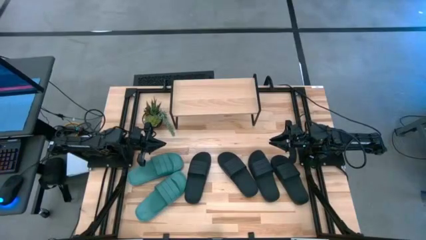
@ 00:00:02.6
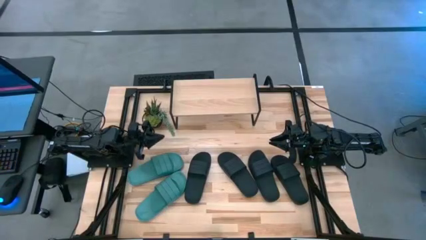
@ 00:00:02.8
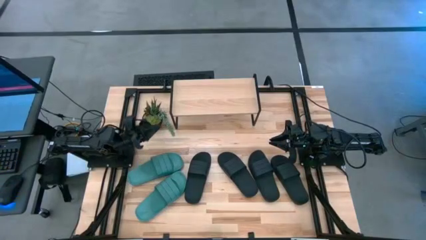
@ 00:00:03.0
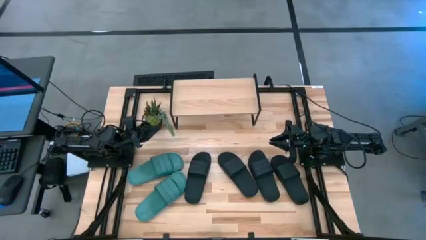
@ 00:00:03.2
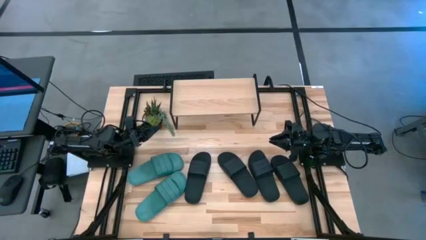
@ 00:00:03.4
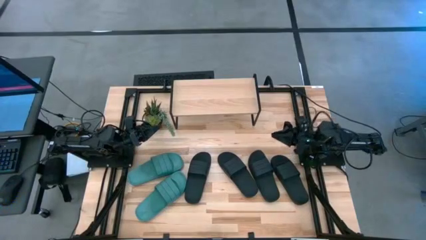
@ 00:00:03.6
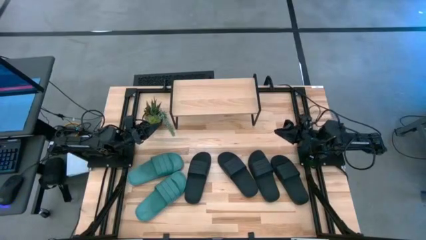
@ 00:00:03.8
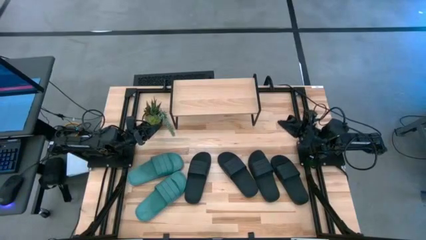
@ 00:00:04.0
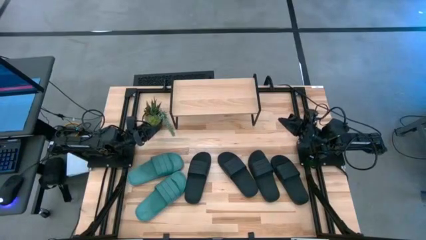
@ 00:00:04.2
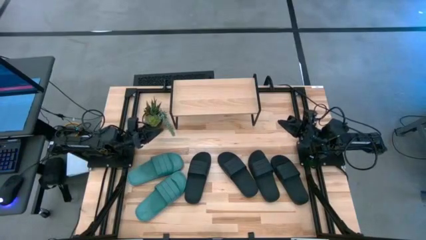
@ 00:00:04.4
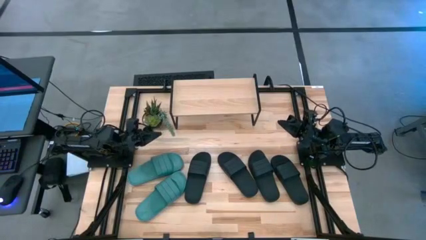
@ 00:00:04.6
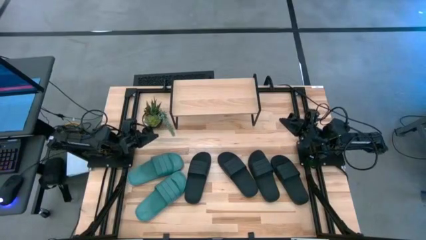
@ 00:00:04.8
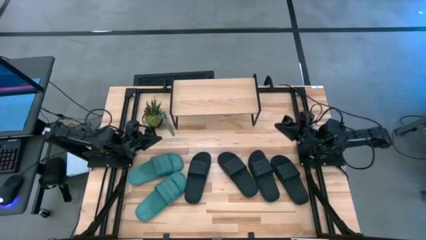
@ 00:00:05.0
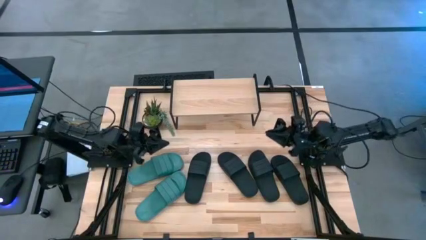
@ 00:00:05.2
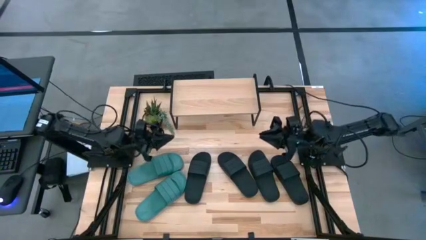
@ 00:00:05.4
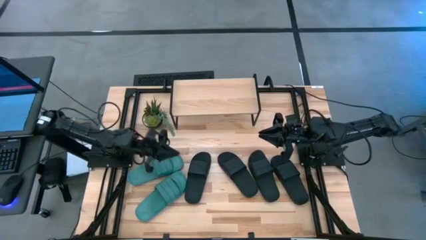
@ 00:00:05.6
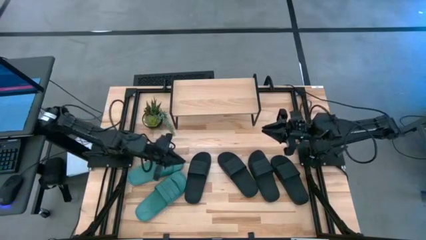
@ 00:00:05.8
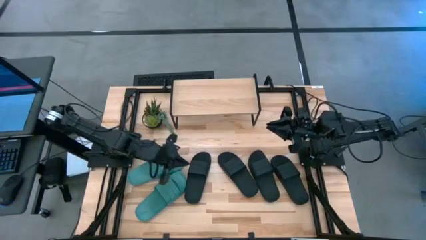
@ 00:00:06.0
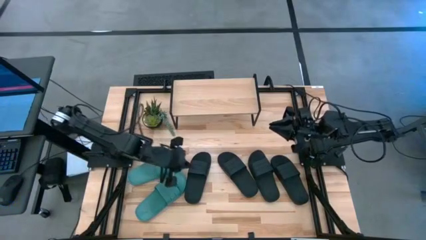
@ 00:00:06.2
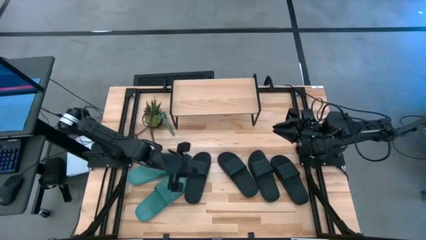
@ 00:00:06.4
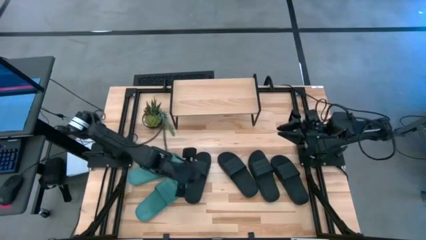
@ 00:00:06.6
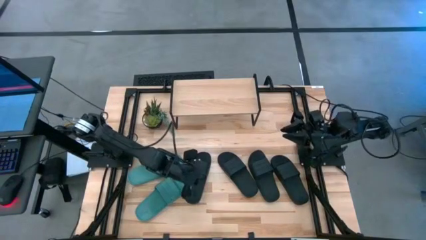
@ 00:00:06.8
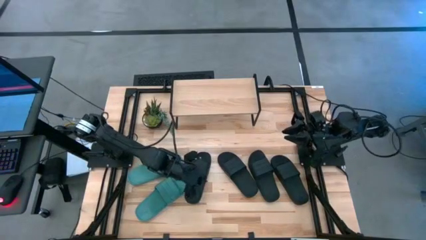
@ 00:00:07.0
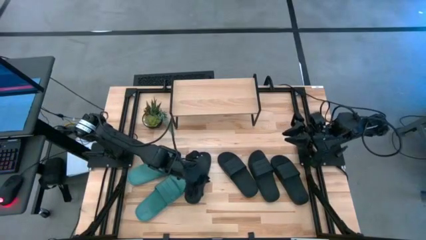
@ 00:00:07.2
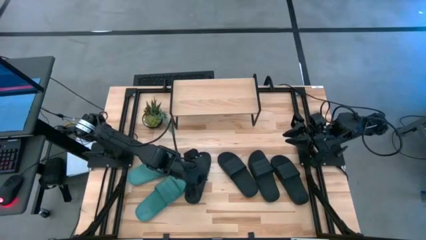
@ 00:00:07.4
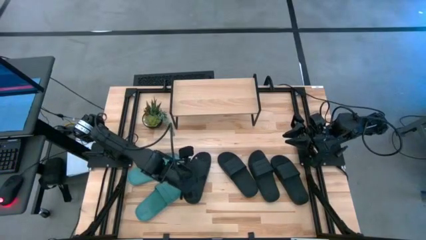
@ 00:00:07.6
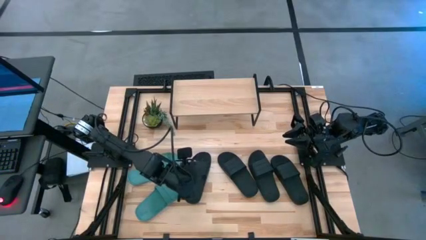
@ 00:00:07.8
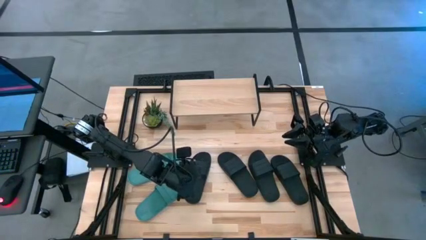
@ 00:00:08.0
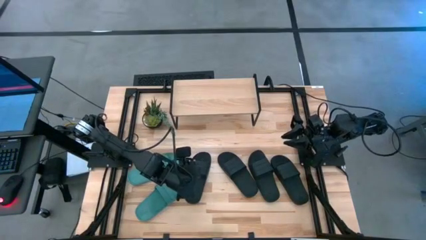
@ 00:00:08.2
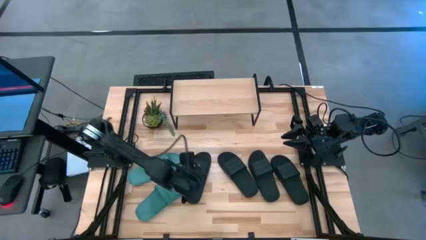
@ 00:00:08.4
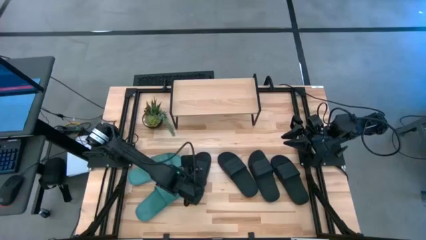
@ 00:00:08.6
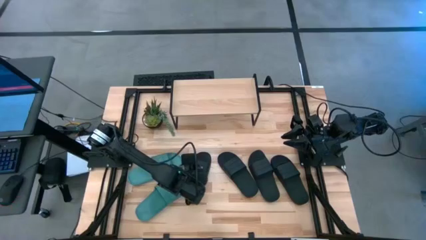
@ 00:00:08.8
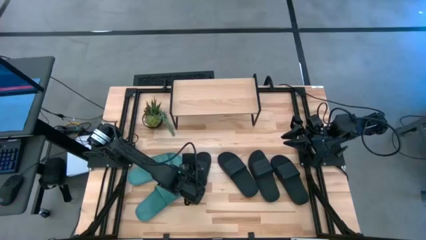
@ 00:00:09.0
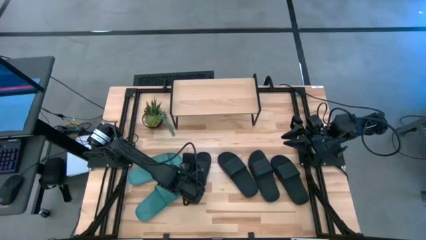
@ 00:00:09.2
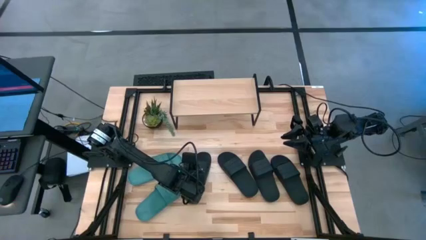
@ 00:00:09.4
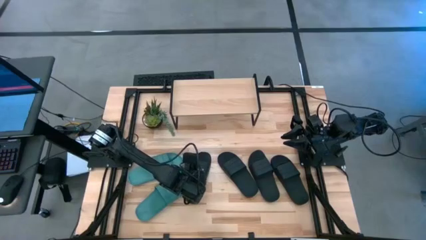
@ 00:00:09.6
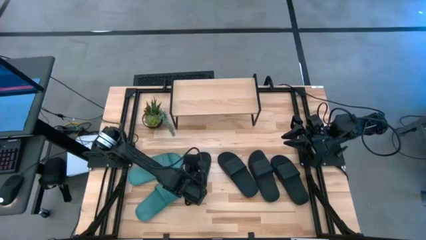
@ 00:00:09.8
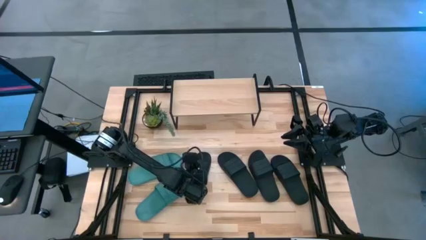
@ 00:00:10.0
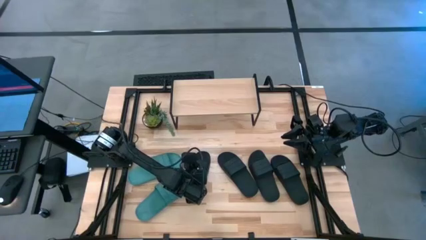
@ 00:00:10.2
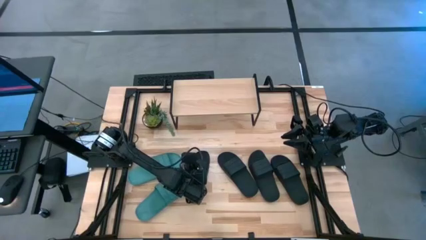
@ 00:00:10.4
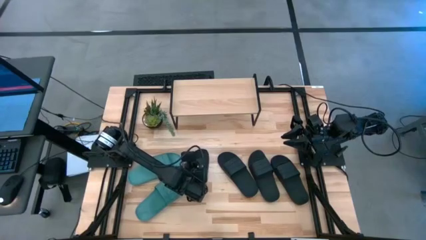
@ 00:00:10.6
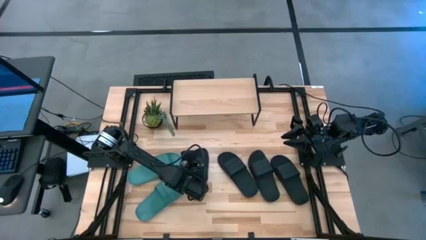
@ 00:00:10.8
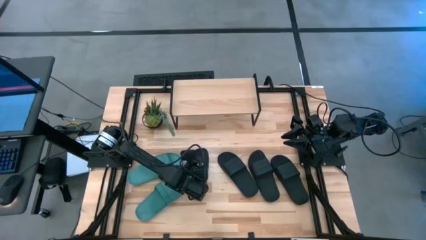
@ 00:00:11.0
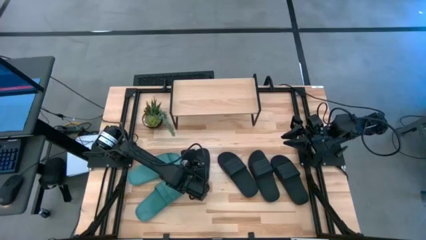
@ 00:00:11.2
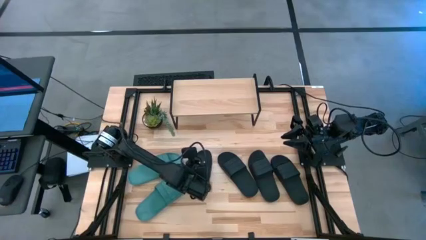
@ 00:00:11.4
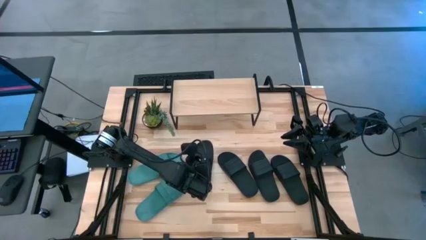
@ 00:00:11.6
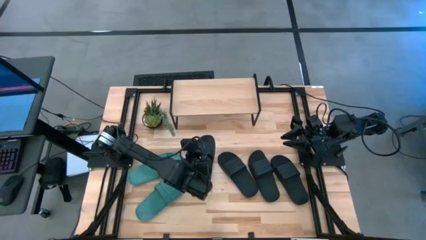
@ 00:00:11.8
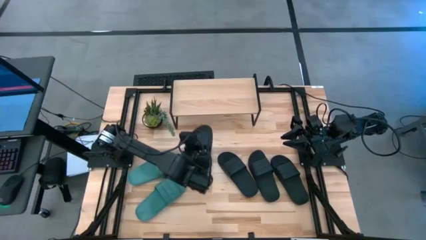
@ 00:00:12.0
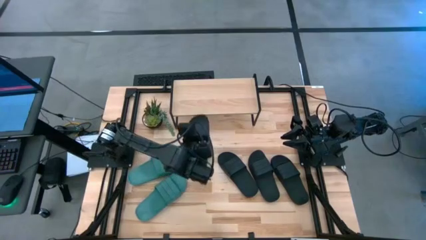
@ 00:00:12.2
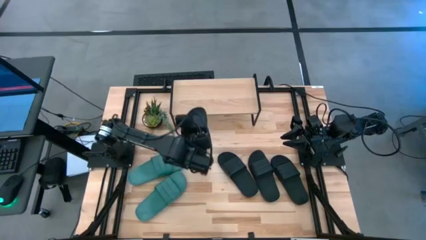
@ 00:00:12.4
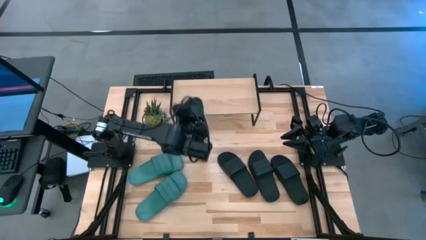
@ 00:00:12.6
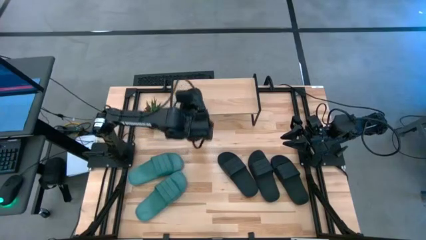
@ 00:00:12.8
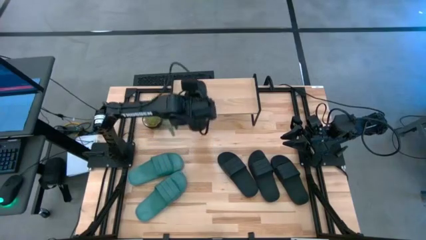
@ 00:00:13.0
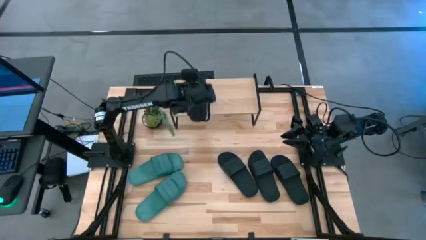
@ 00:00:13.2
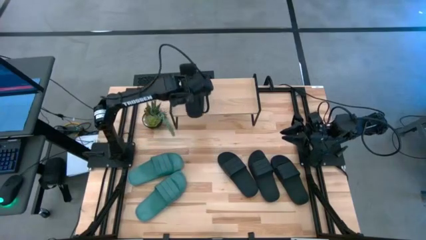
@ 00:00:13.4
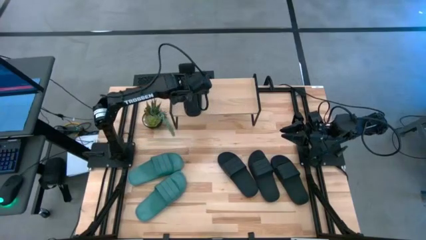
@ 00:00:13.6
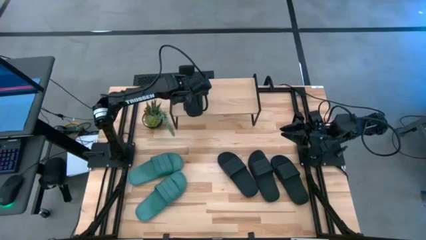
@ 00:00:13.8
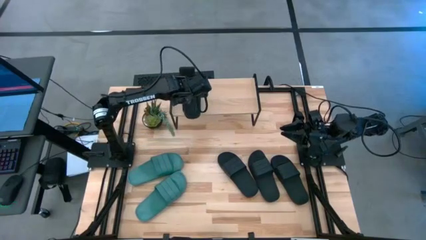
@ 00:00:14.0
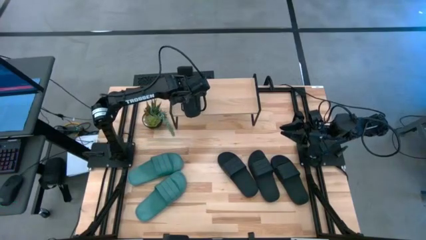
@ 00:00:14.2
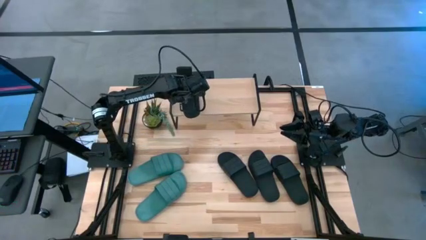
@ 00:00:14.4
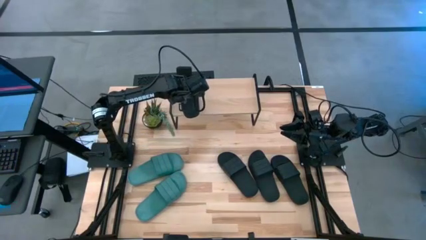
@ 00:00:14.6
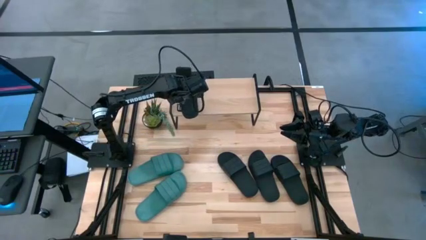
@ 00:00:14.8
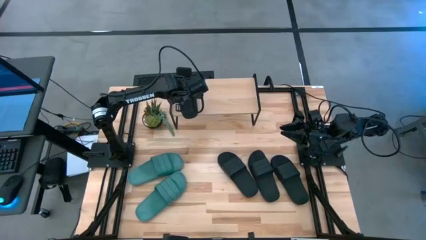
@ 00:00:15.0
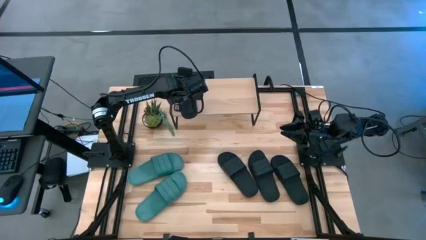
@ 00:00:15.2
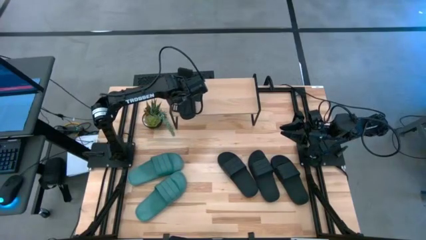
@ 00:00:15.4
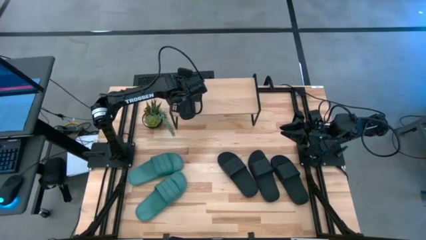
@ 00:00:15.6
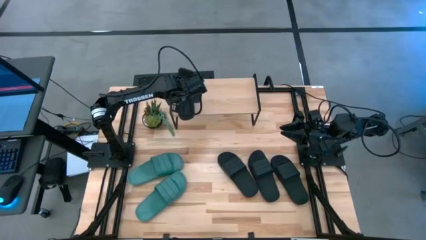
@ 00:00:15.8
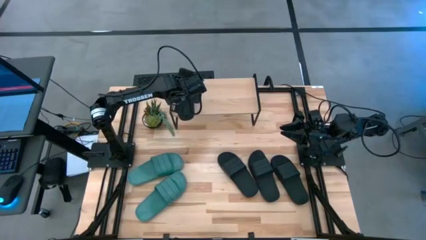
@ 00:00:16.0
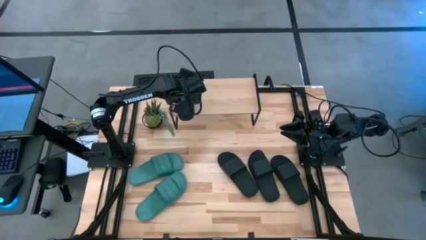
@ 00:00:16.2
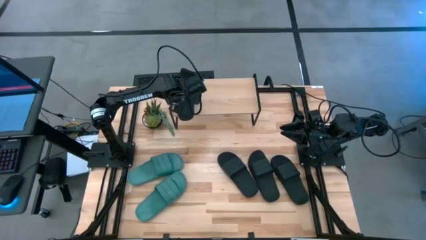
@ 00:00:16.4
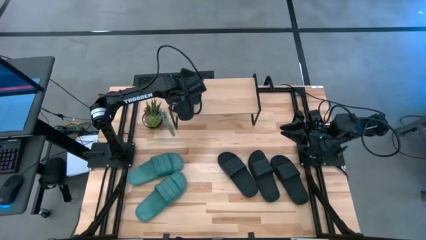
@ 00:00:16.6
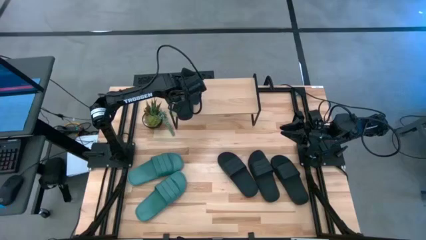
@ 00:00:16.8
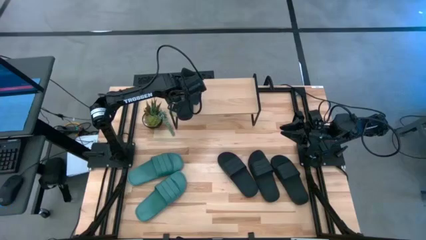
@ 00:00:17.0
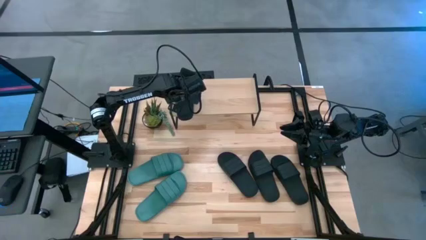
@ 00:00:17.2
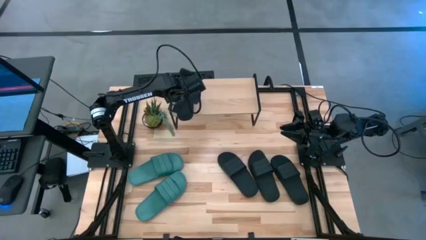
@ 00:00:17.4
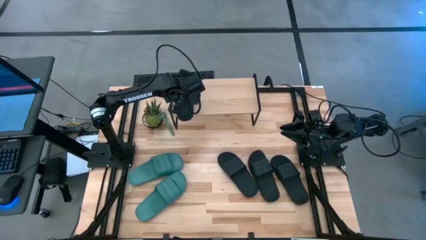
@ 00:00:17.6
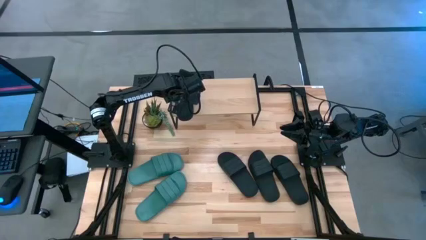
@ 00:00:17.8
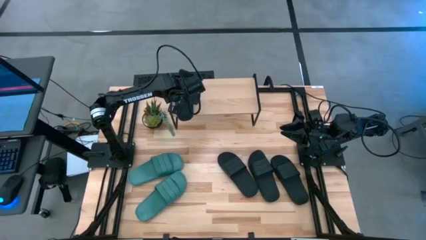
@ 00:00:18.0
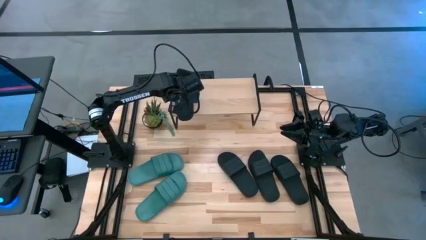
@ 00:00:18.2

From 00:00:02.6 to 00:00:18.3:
Task: Pick and place slides into the shelf
Put the black slide on the shelf
